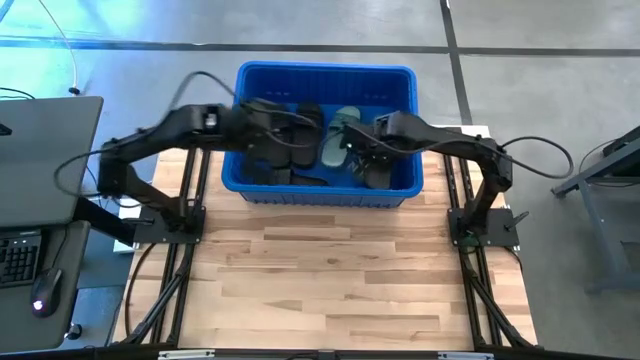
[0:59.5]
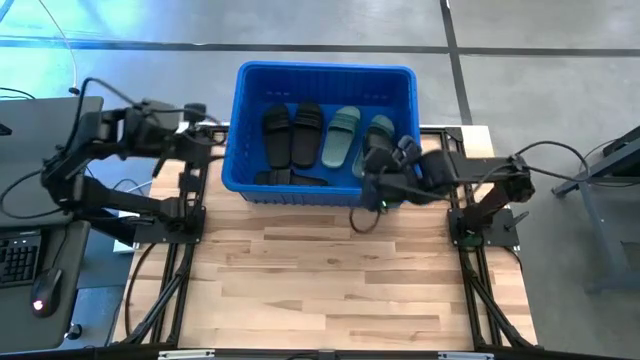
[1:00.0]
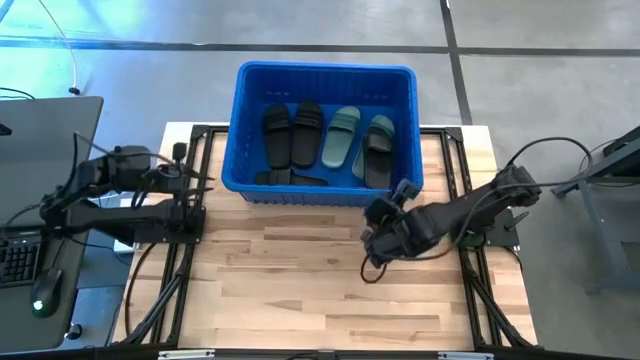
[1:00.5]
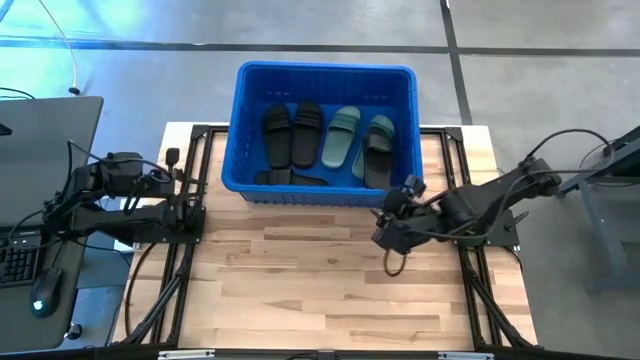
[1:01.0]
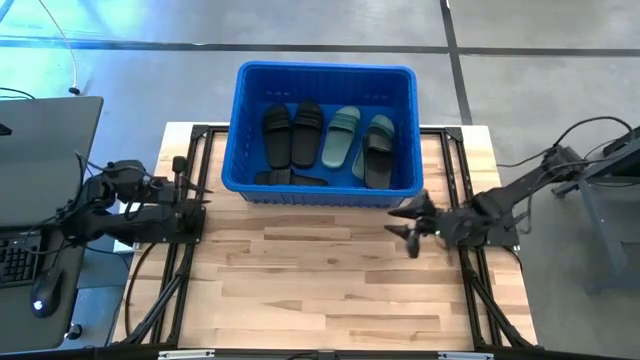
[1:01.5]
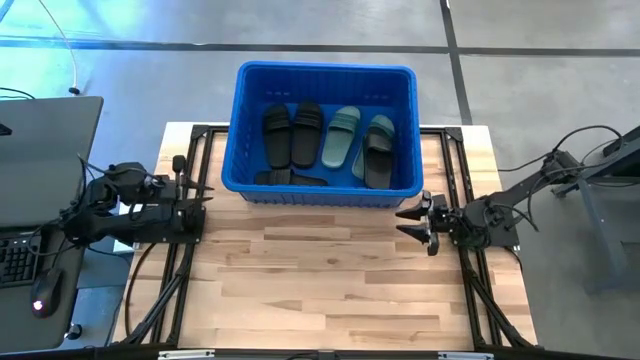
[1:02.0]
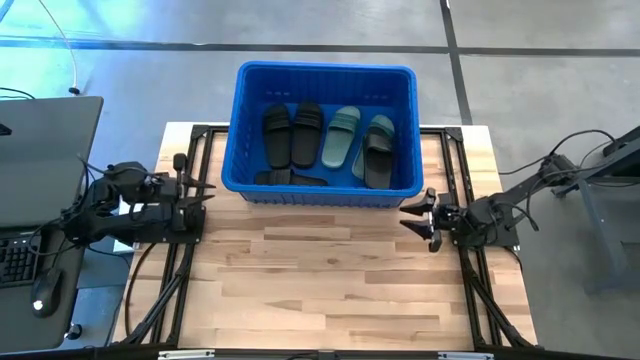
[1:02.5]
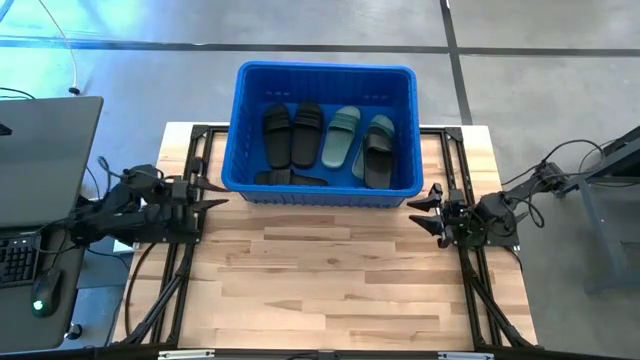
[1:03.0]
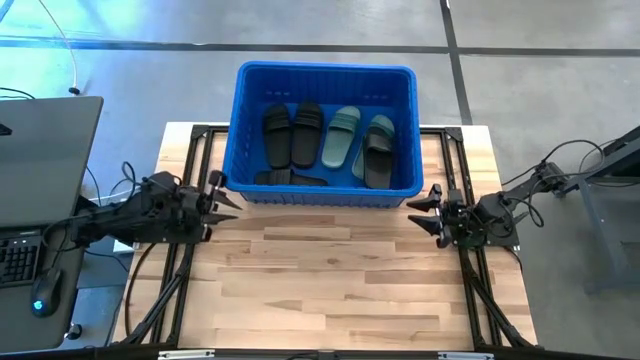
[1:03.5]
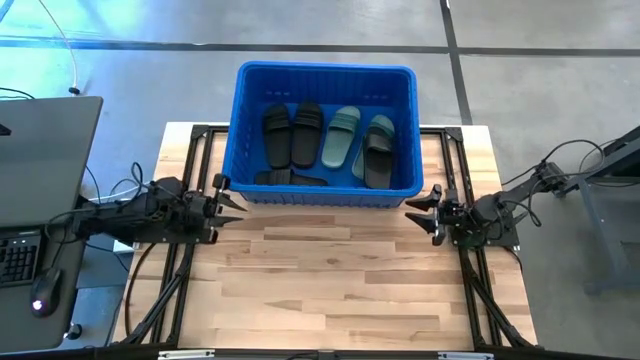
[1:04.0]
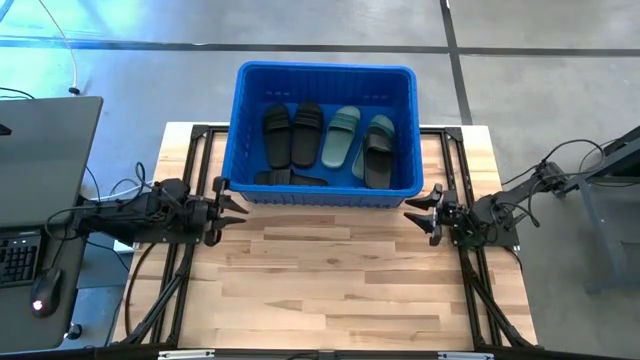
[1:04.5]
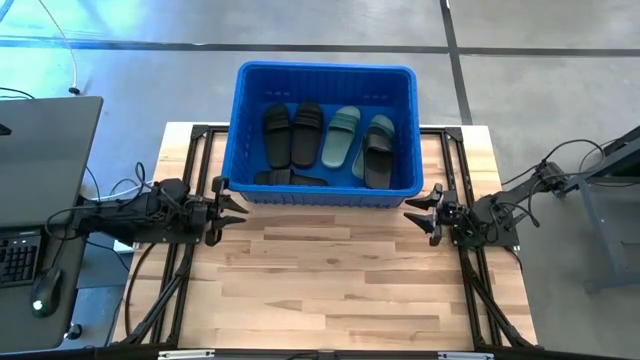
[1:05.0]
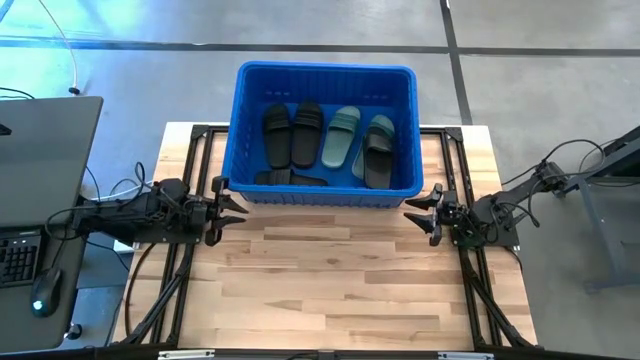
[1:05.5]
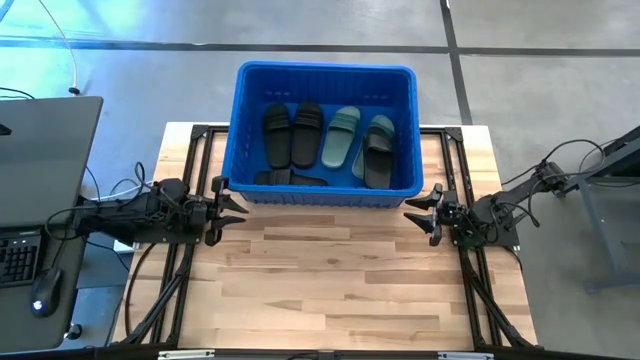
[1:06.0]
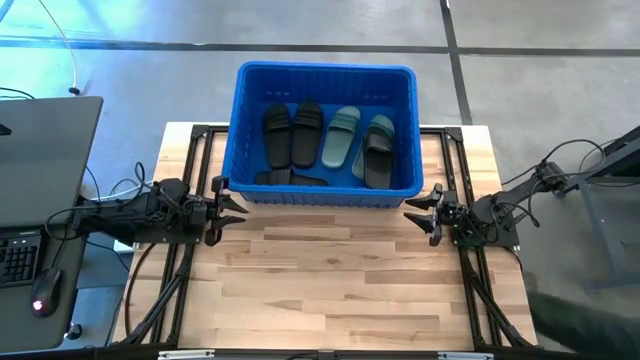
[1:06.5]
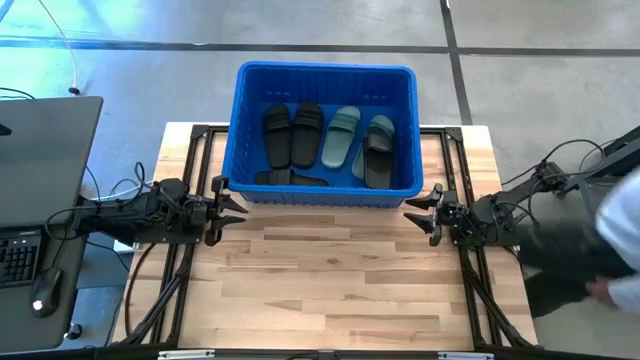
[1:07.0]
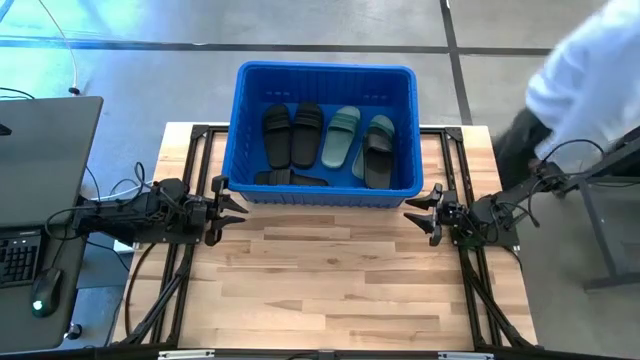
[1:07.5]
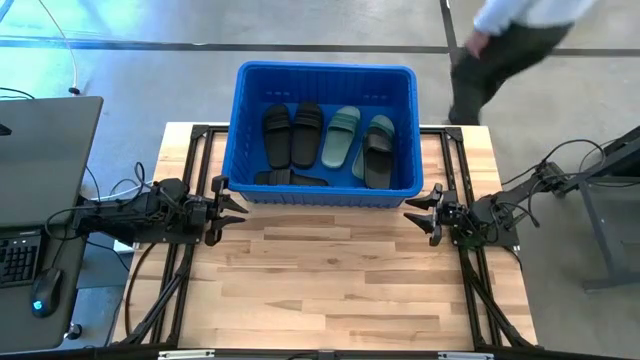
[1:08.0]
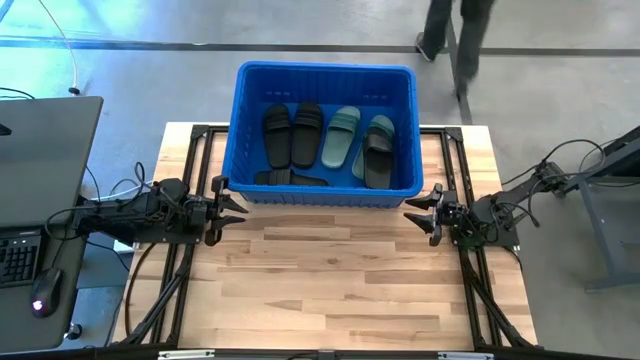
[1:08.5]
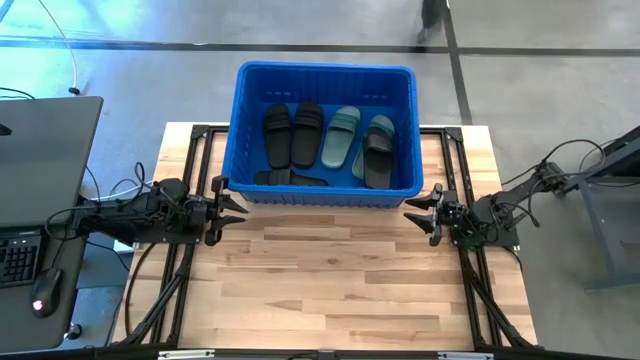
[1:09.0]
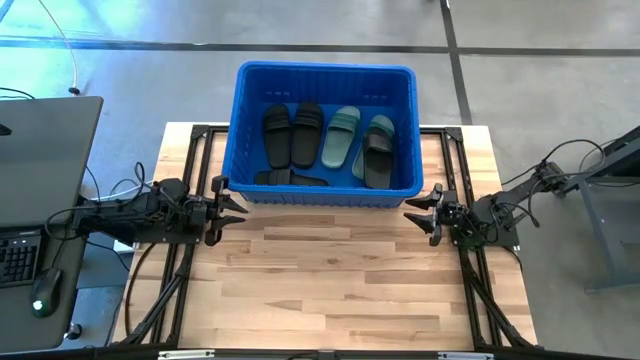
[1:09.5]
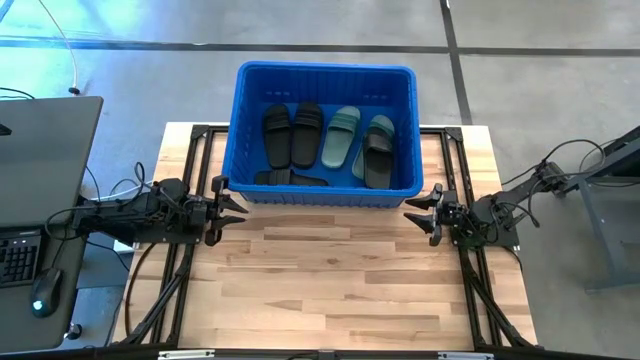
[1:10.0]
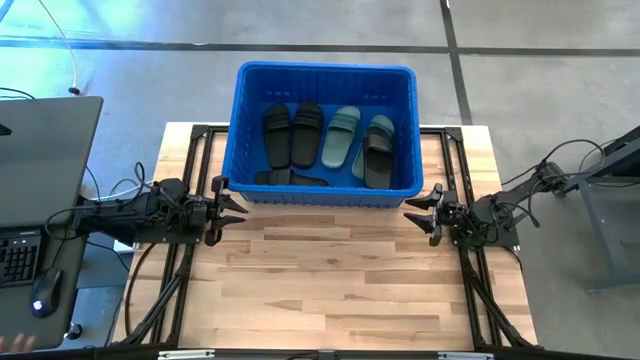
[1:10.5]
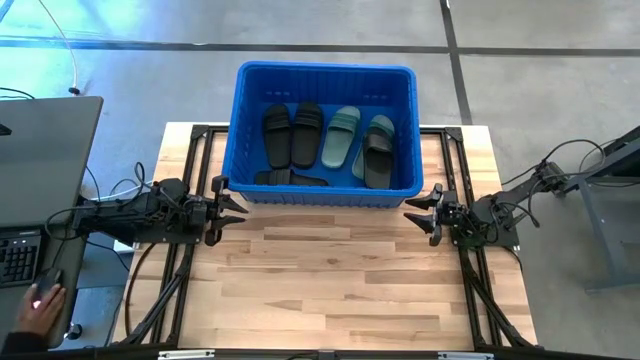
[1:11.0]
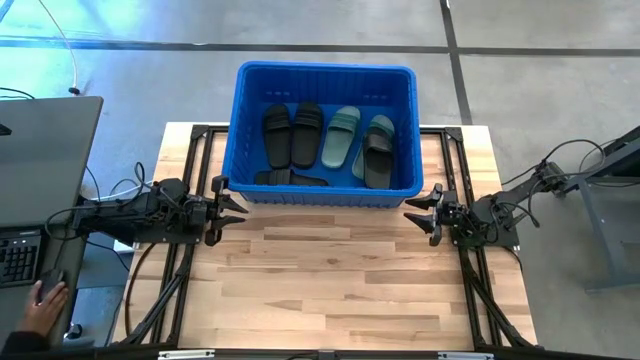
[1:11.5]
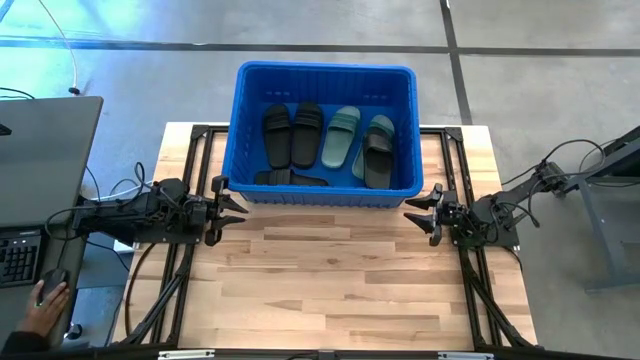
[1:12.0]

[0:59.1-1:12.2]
Task: Pick and place slides into bin
Return to Home Position

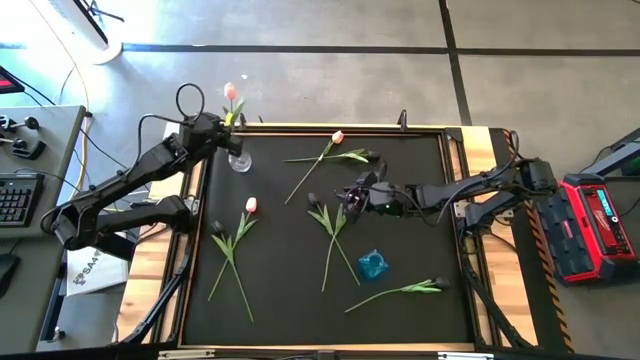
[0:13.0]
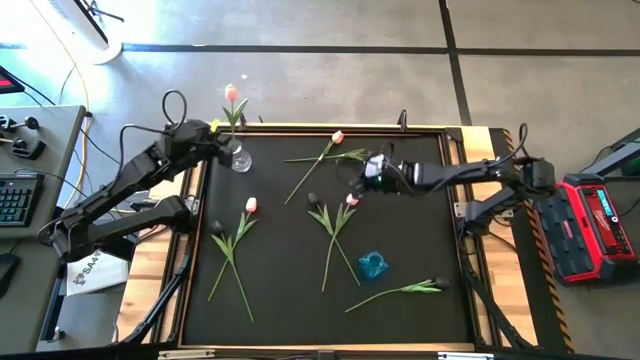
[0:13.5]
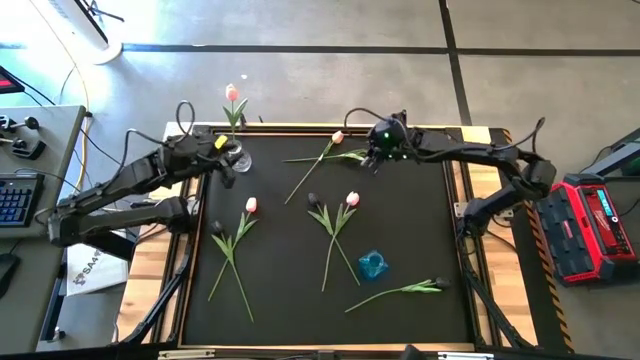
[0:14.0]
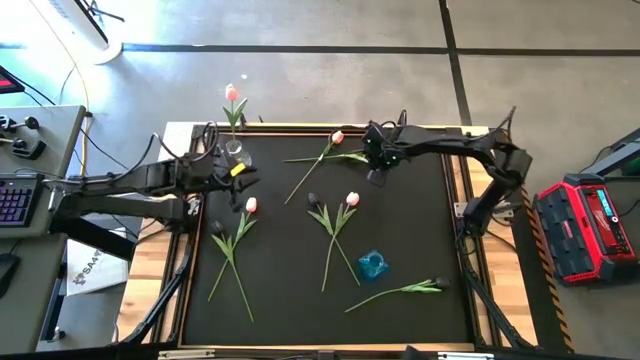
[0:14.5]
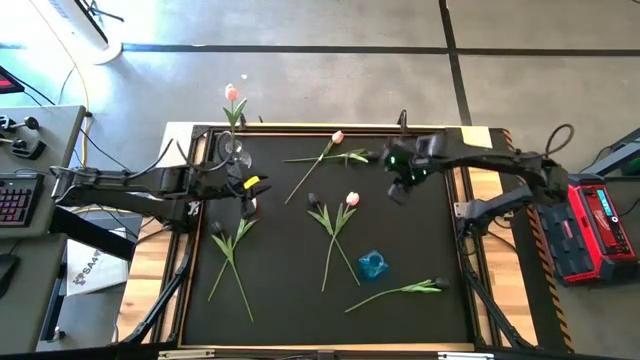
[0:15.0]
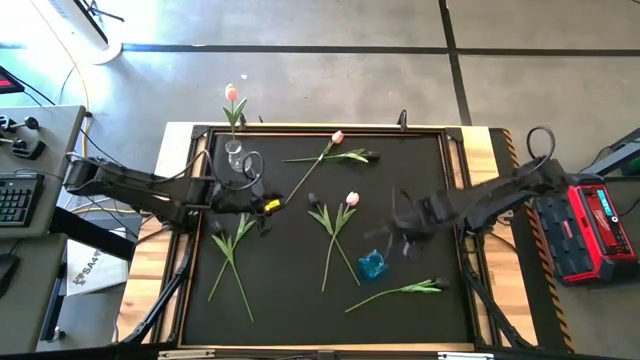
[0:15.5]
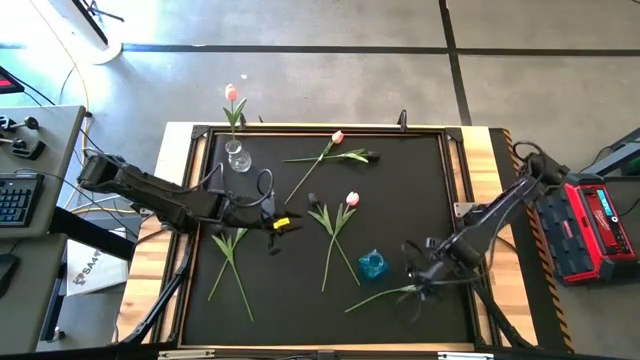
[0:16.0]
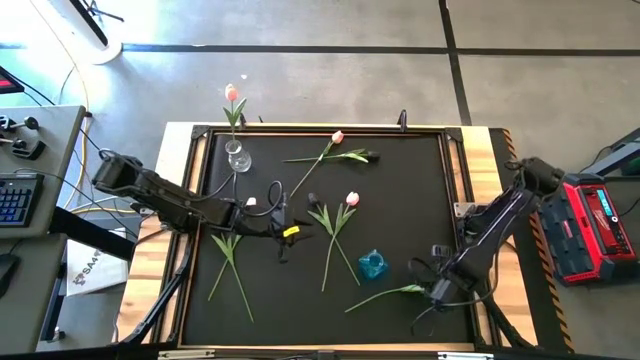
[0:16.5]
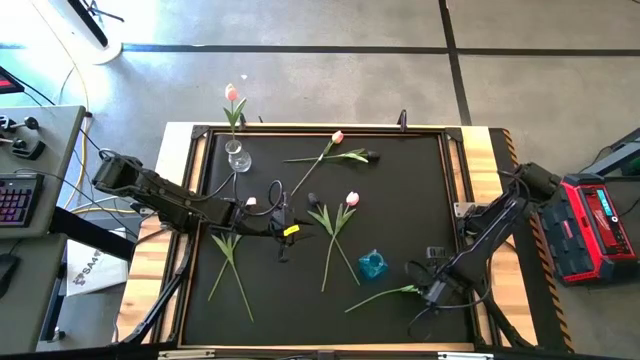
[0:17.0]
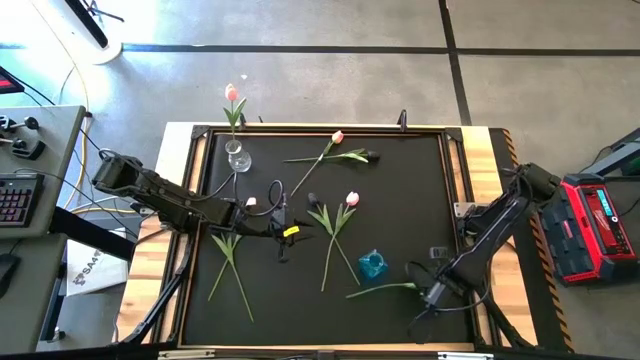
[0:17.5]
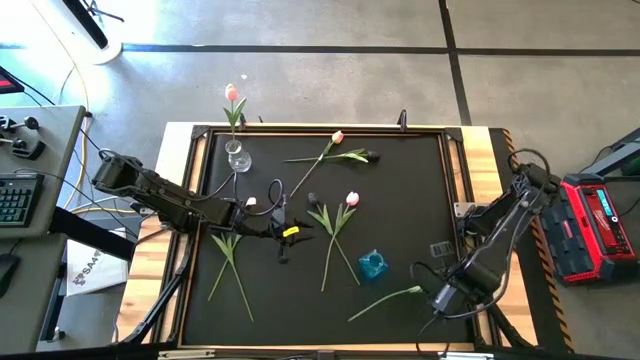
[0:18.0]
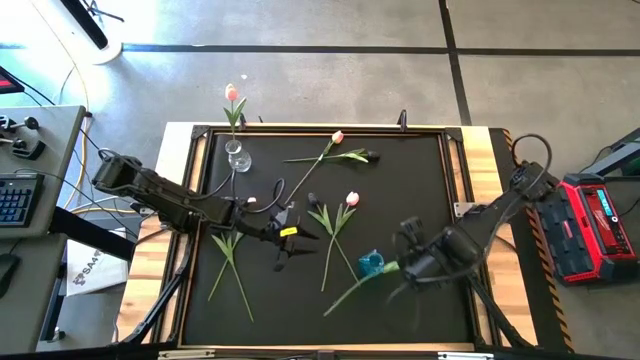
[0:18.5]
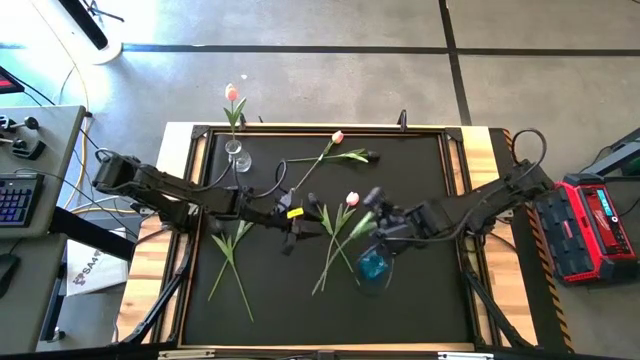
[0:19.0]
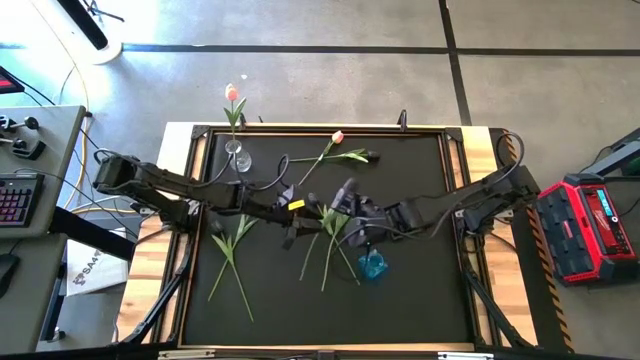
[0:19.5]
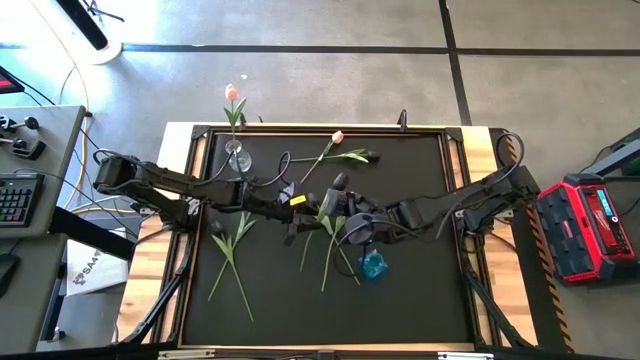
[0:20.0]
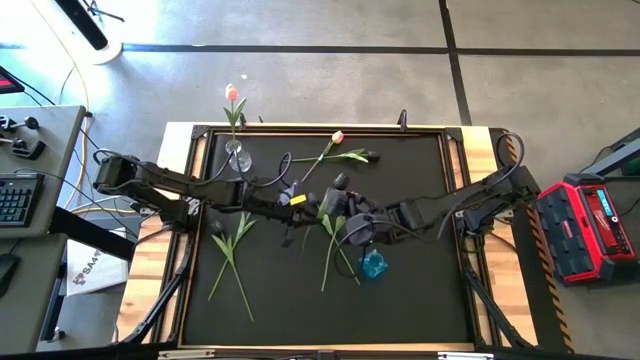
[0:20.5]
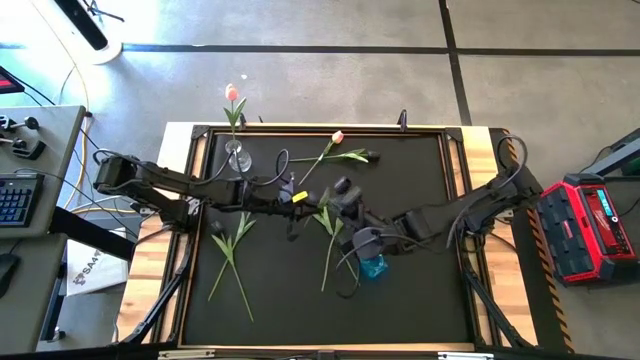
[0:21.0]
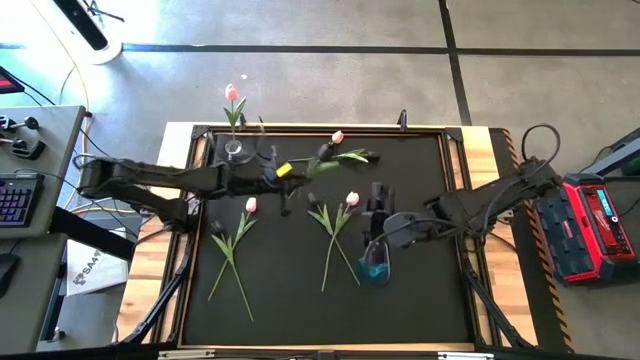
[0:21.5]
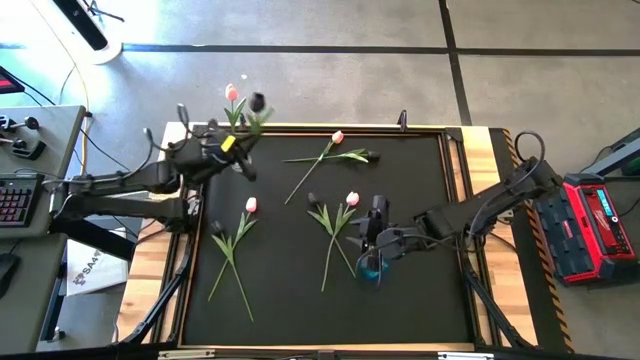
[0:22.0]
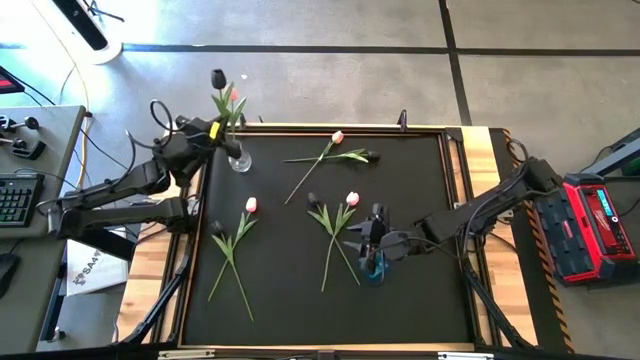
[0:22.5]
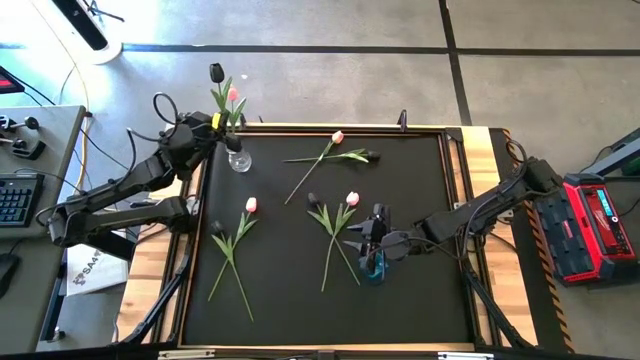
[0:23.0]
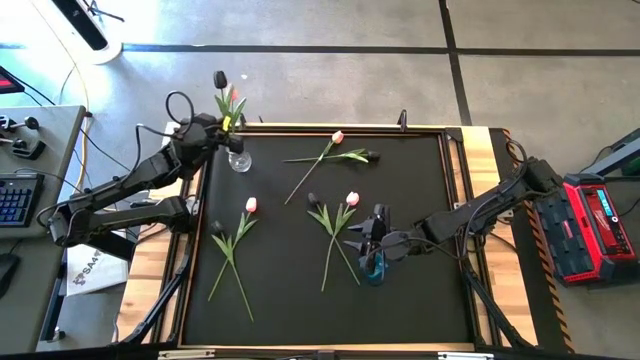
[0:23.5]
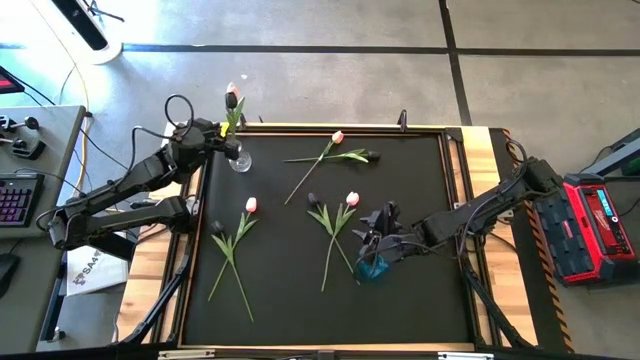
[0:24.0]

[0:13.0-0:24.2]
Task: Sort flowers into vase by color
Put the bottom right black flower into the transparent vase
